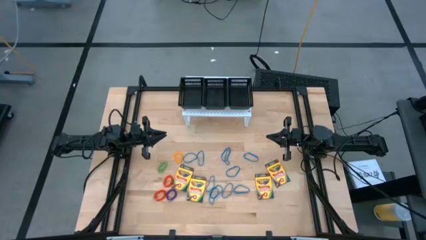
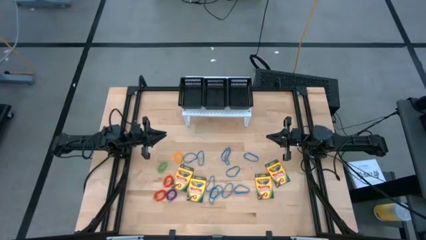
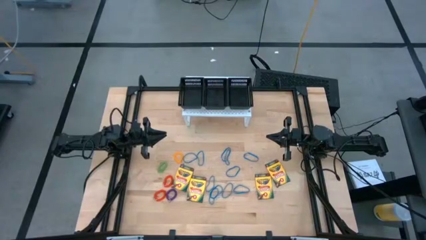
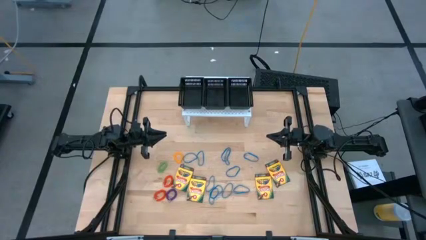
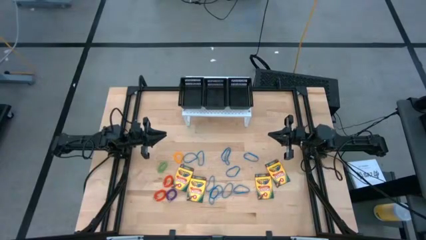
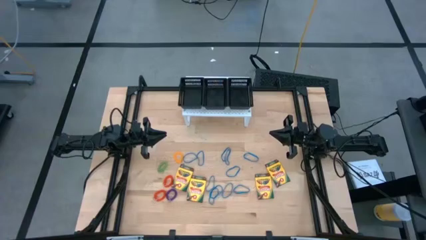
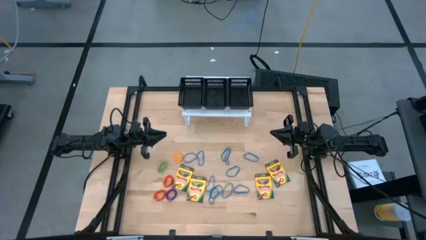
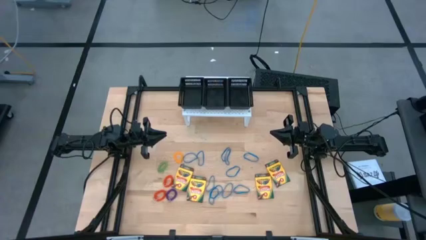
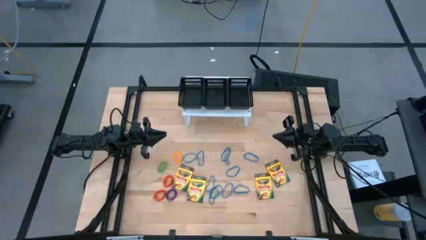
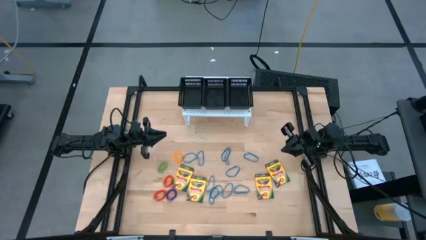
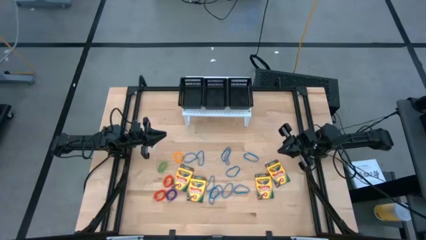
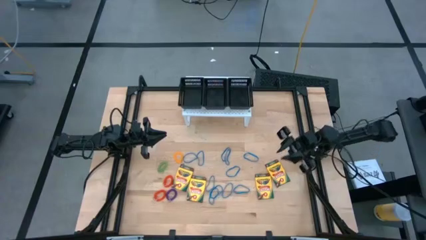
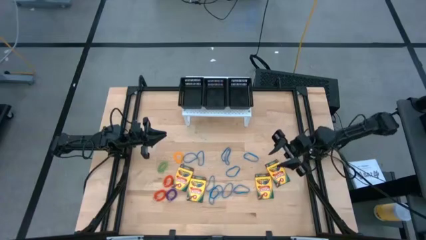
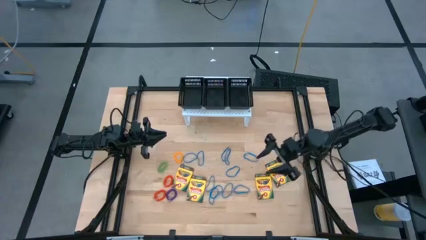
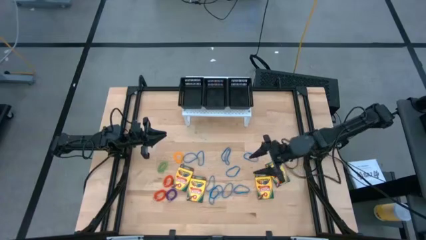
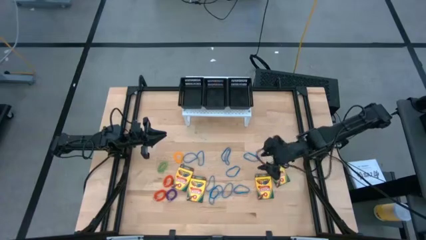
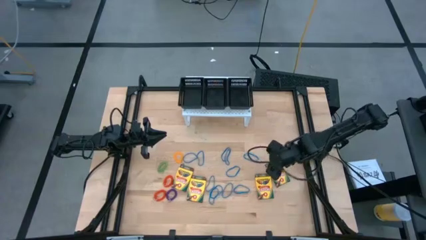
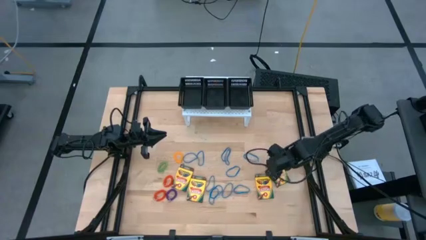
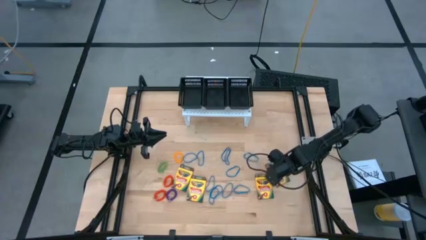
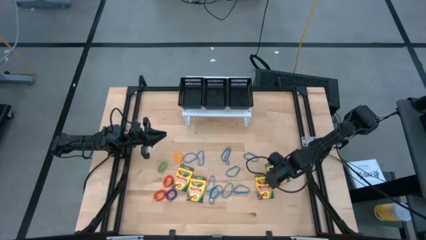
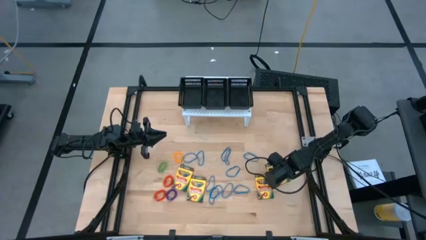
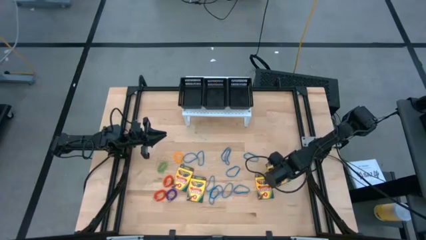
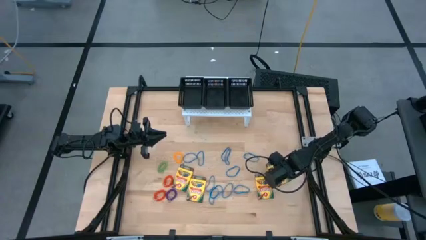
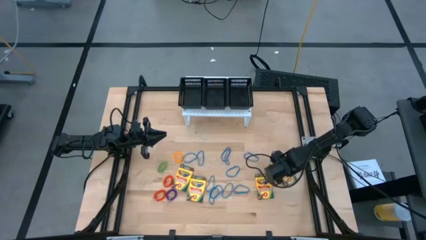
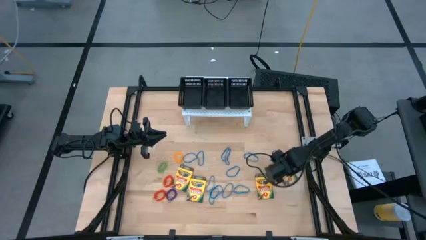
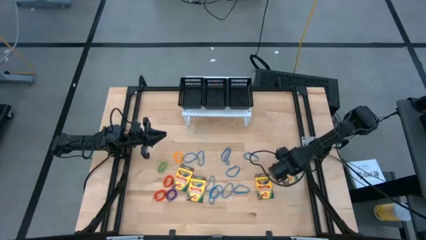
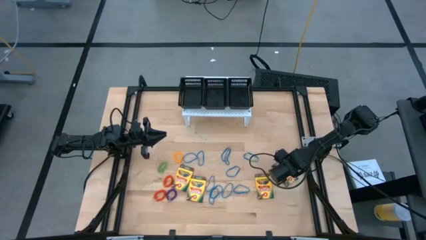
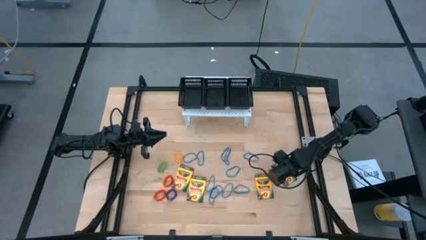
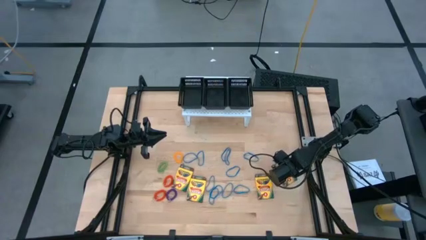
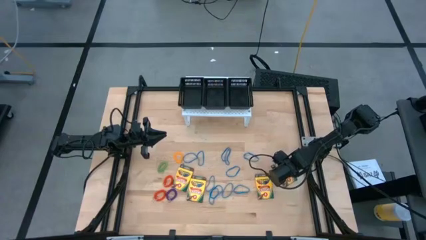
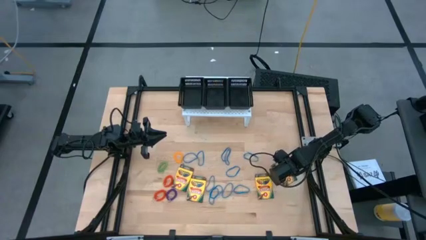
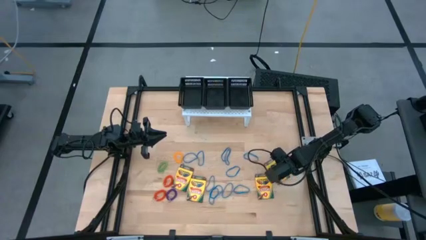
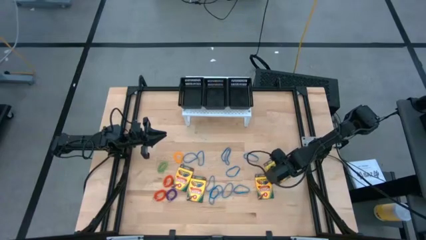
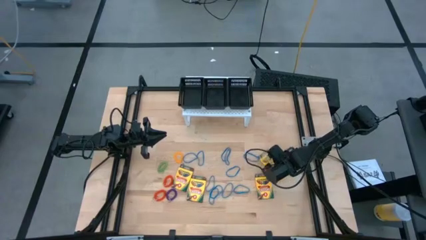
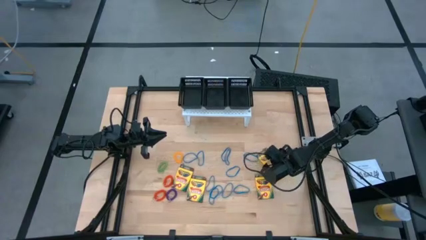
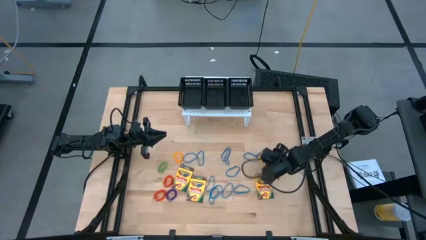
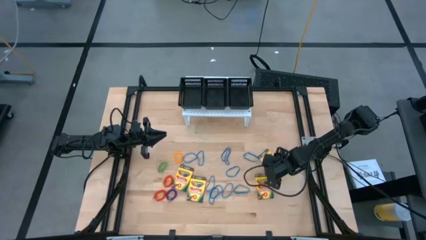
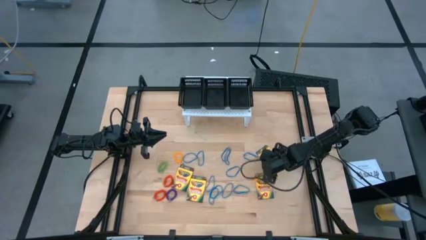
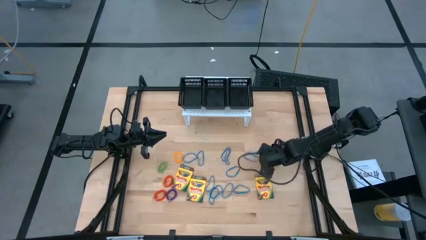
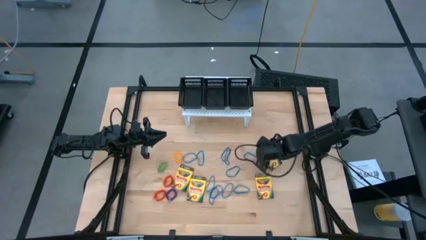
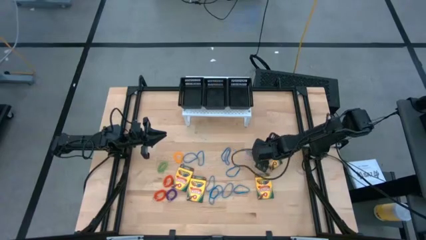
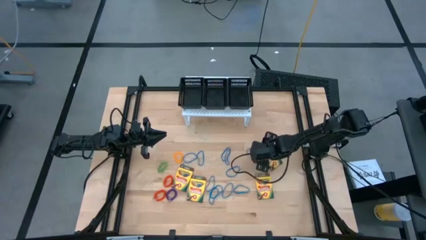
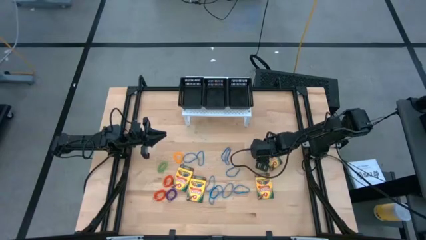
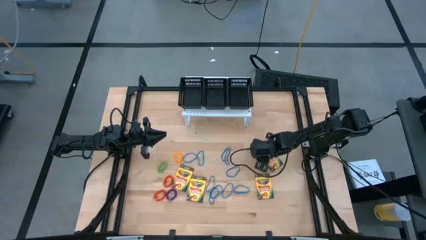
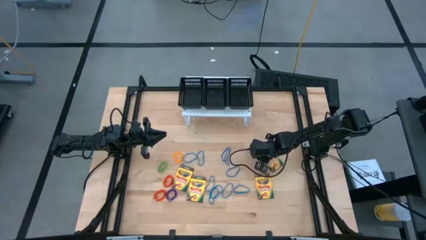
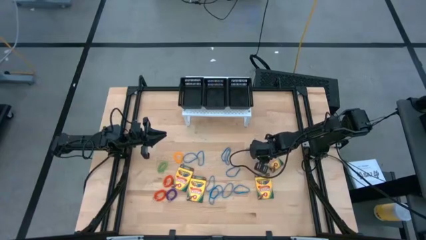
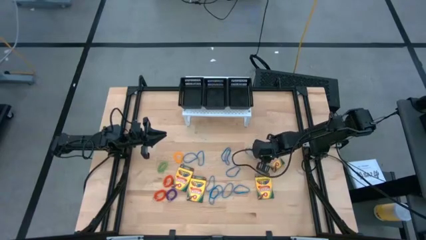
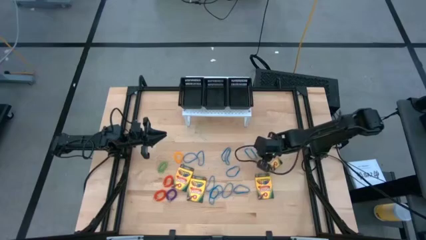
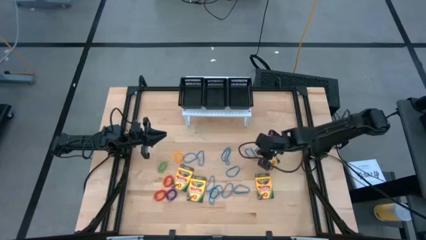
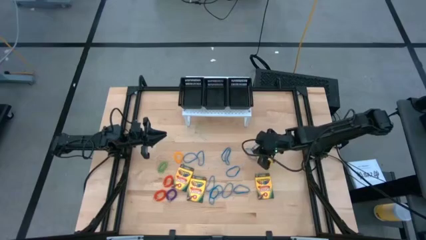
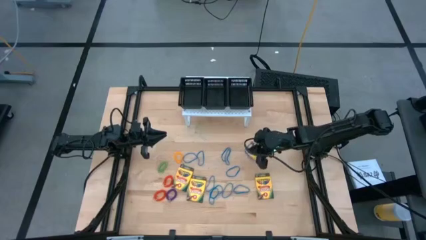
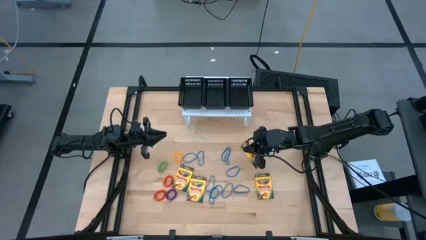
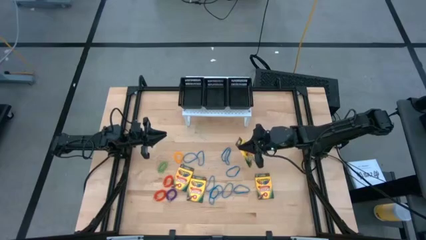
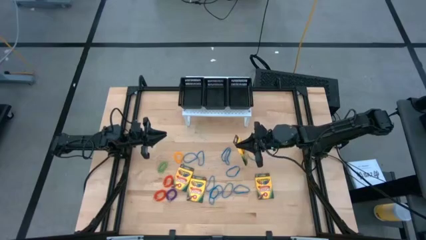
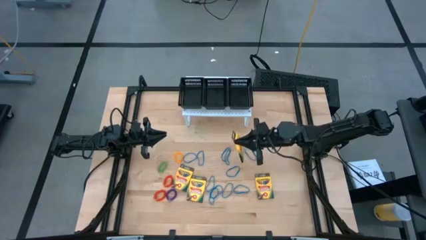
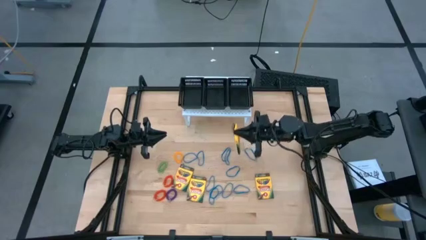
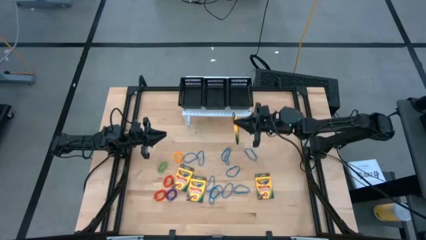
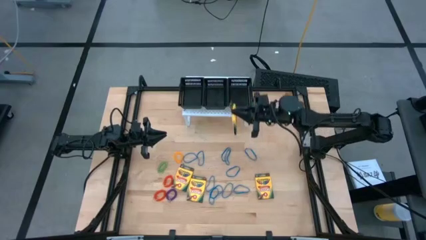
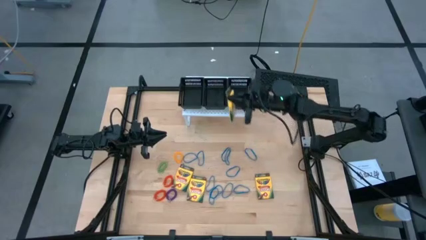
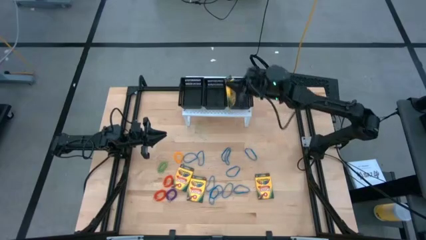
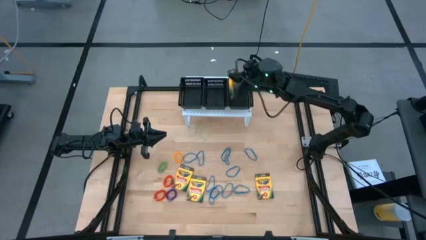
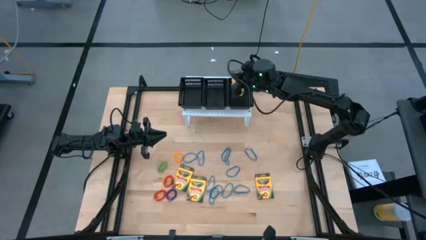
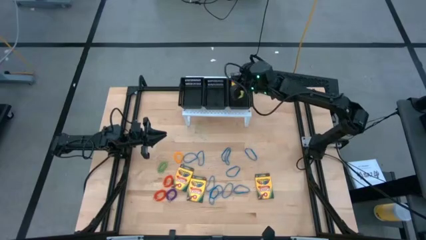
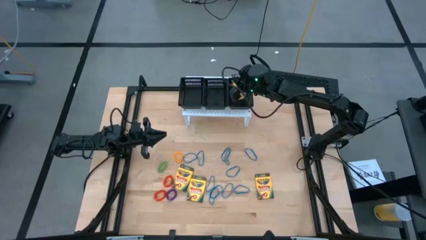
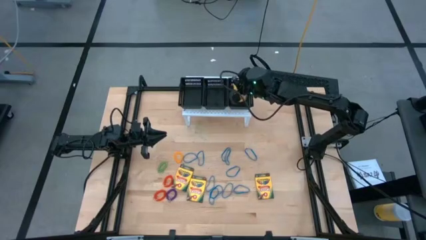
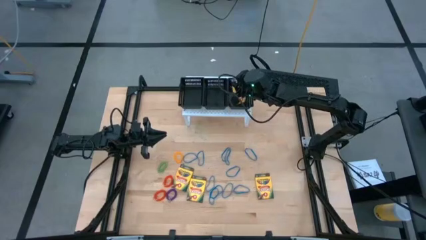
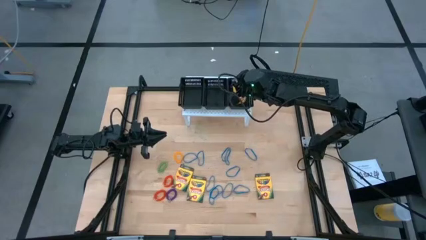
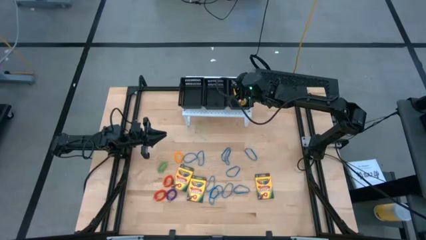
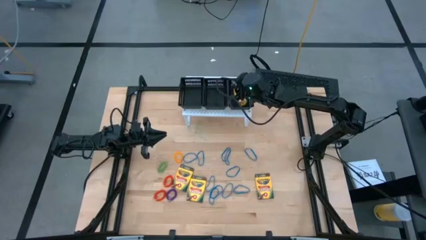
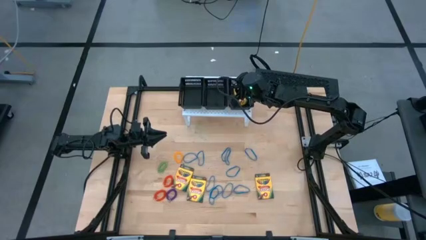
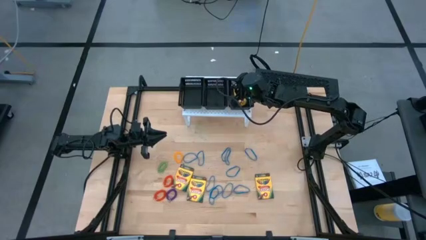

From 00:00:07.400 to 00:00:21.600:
Task: Pick & Place Office Desk Supplies
Put the crayon box into the right black bin
